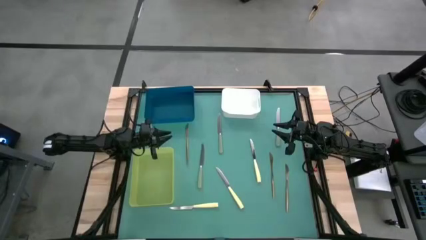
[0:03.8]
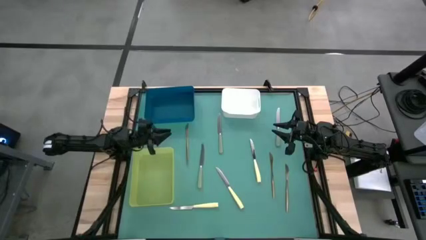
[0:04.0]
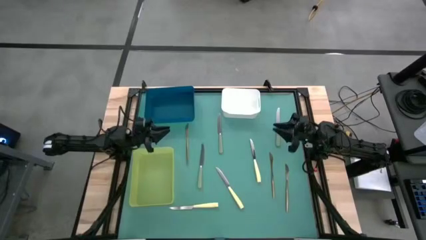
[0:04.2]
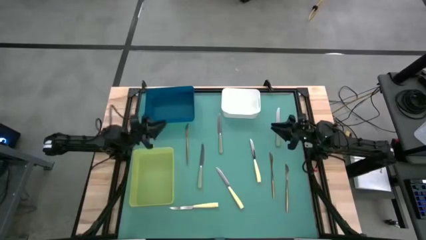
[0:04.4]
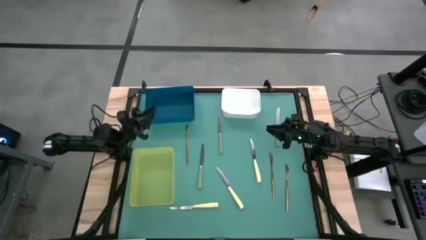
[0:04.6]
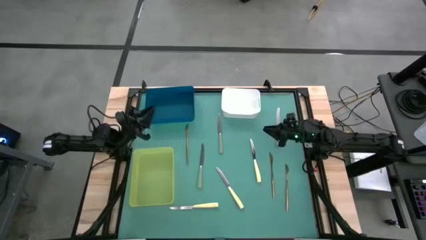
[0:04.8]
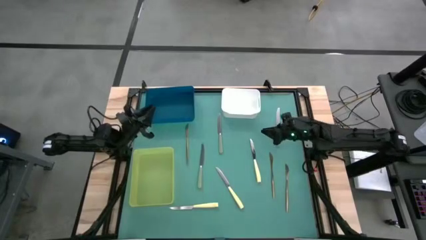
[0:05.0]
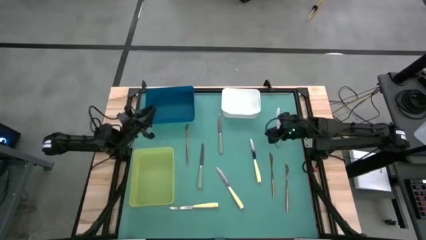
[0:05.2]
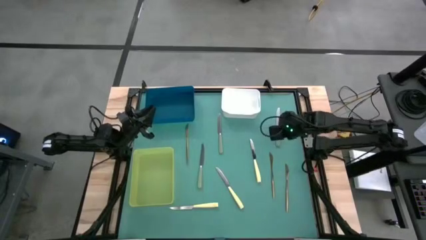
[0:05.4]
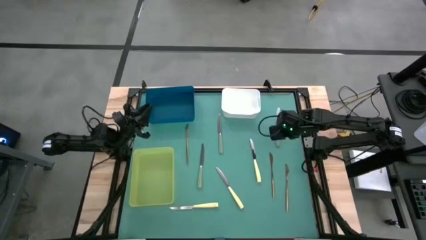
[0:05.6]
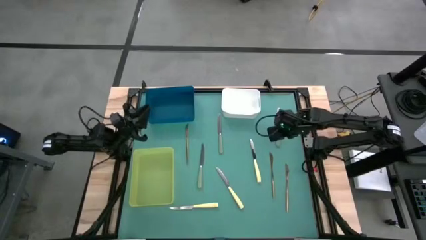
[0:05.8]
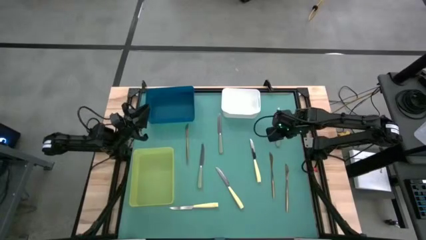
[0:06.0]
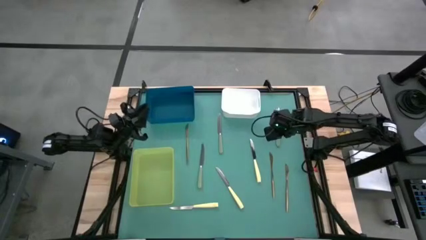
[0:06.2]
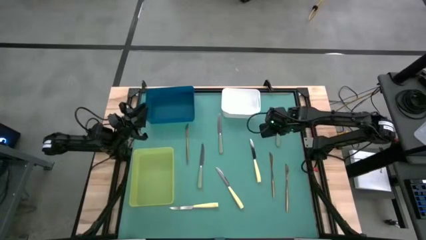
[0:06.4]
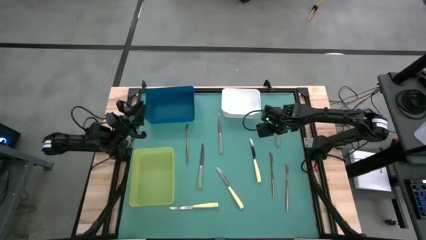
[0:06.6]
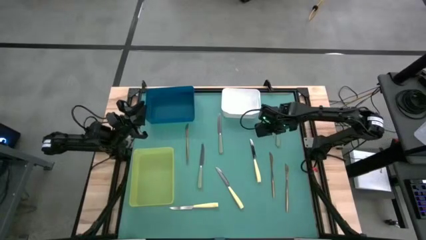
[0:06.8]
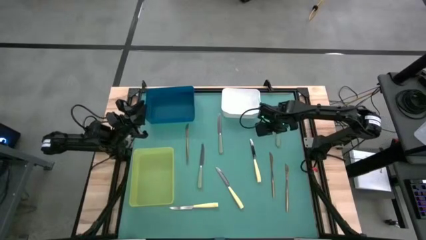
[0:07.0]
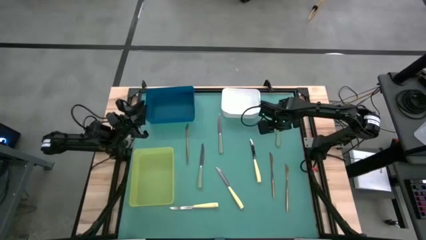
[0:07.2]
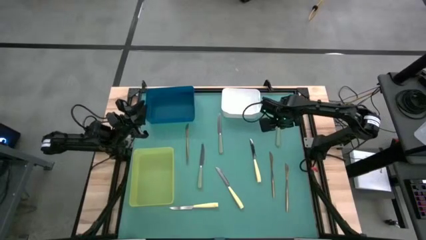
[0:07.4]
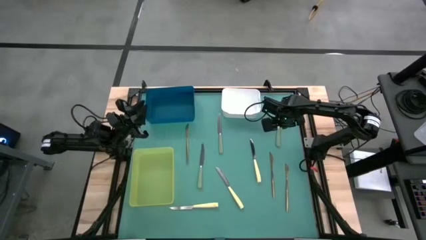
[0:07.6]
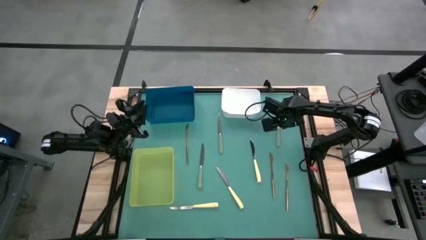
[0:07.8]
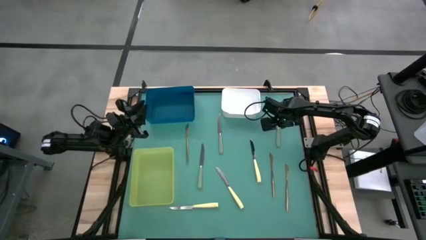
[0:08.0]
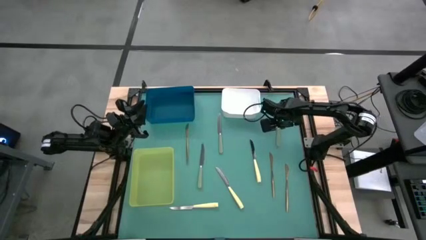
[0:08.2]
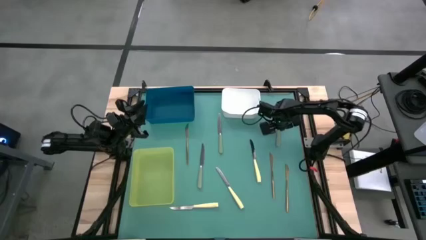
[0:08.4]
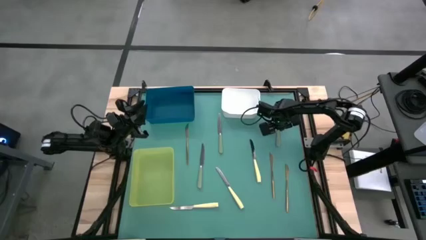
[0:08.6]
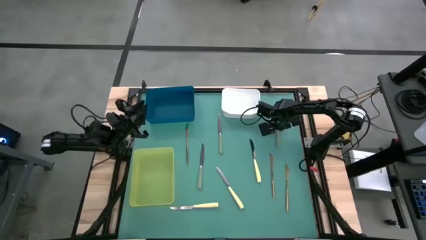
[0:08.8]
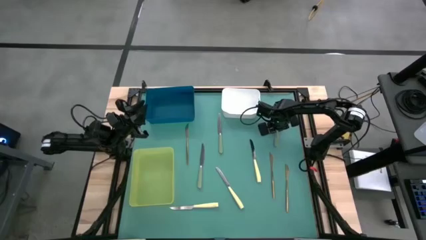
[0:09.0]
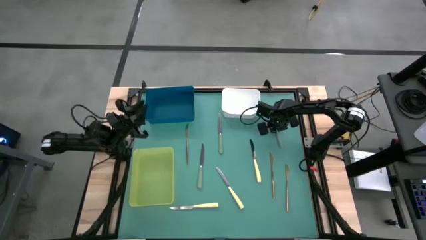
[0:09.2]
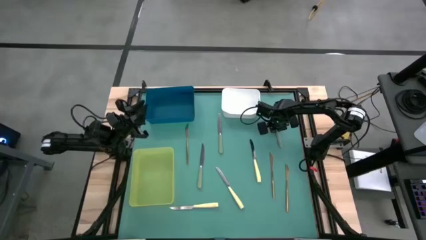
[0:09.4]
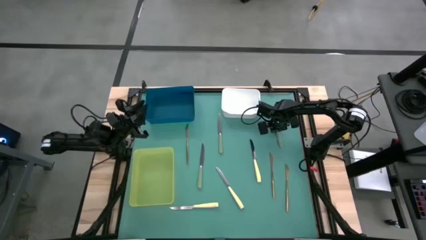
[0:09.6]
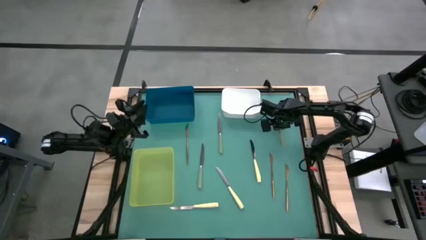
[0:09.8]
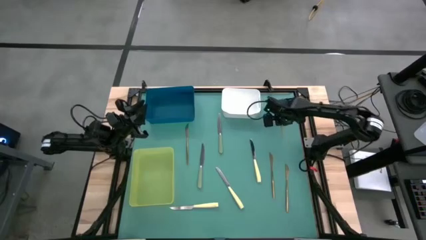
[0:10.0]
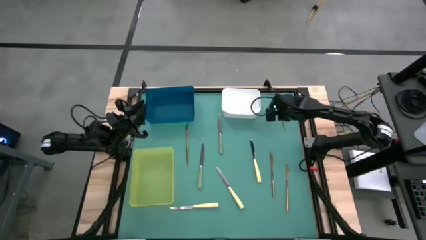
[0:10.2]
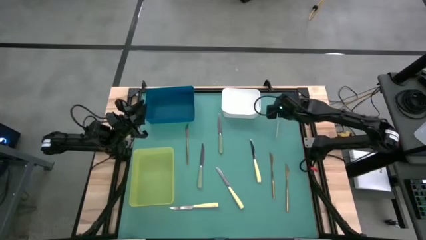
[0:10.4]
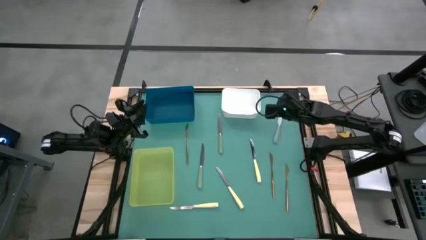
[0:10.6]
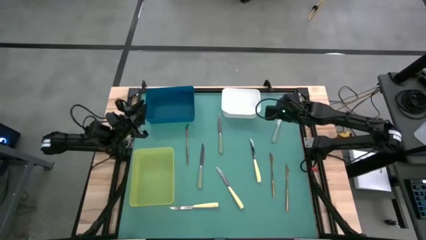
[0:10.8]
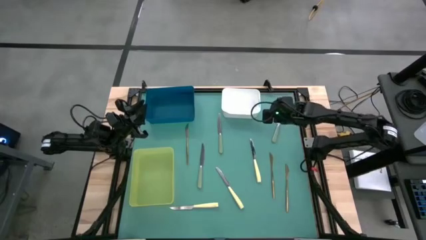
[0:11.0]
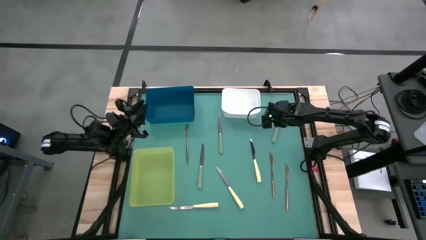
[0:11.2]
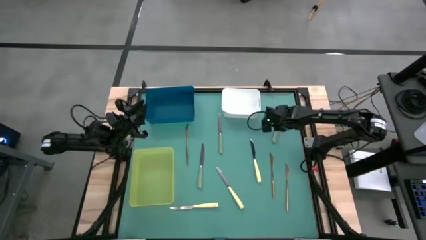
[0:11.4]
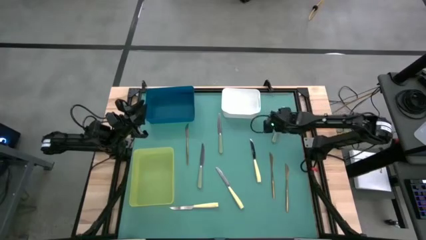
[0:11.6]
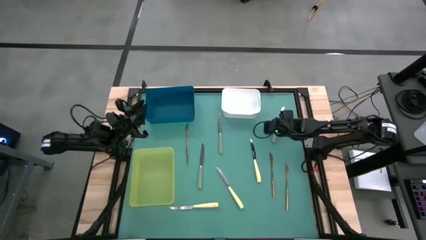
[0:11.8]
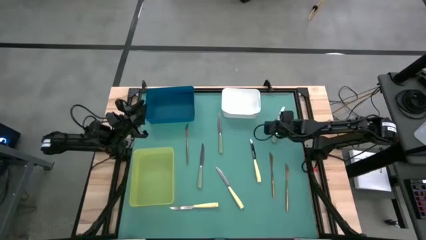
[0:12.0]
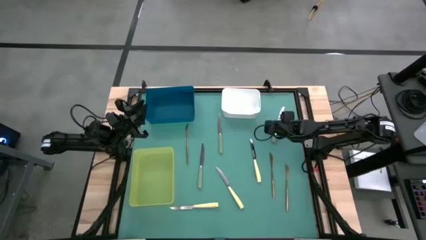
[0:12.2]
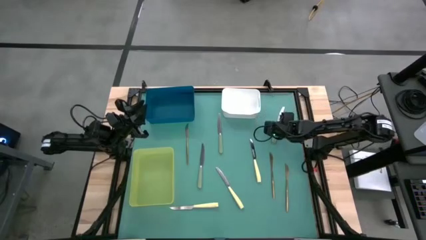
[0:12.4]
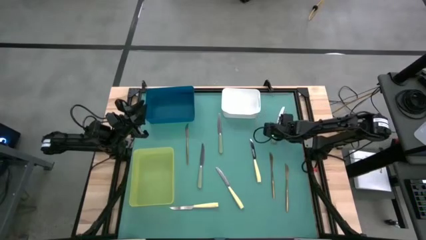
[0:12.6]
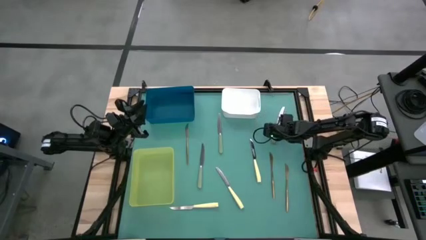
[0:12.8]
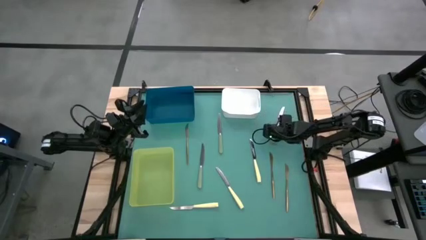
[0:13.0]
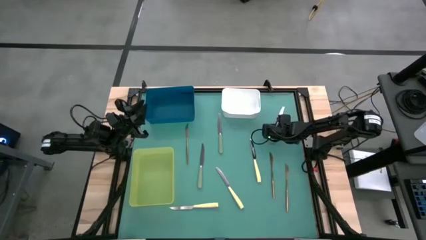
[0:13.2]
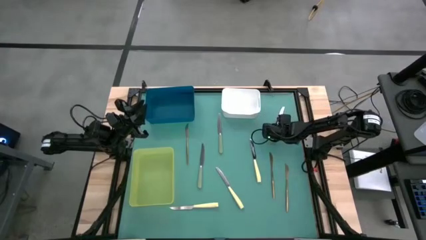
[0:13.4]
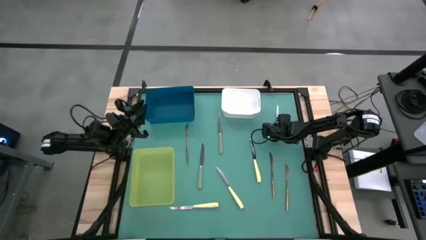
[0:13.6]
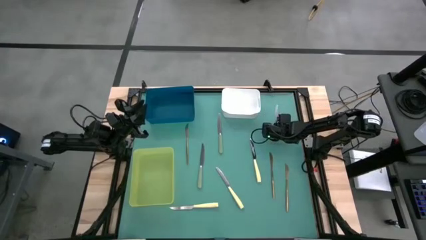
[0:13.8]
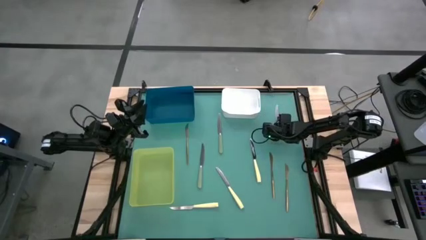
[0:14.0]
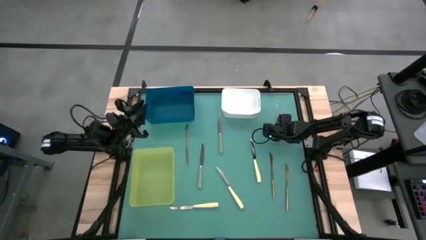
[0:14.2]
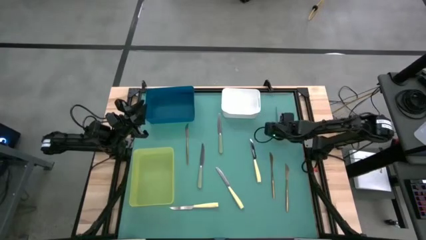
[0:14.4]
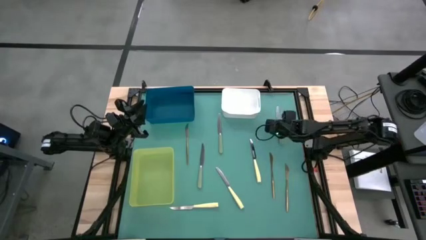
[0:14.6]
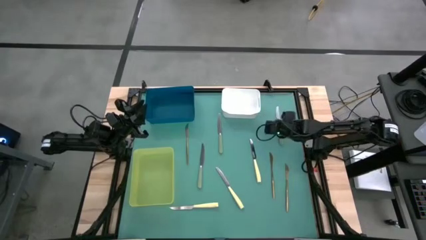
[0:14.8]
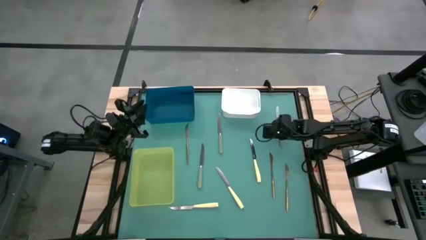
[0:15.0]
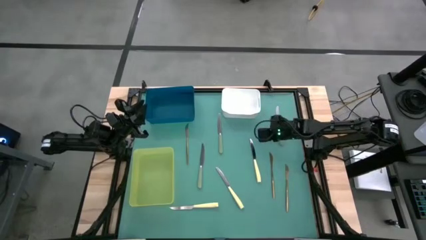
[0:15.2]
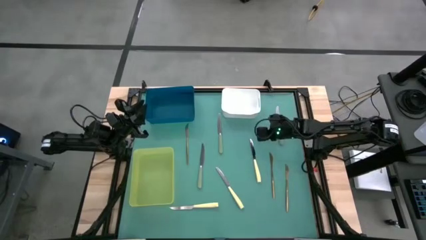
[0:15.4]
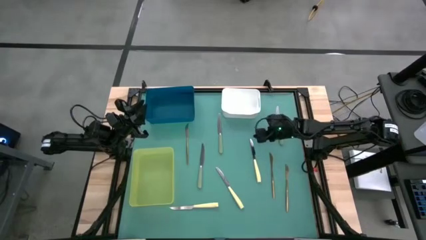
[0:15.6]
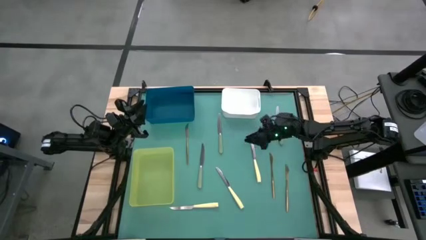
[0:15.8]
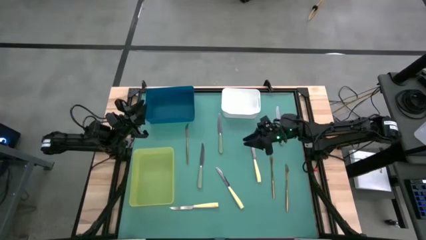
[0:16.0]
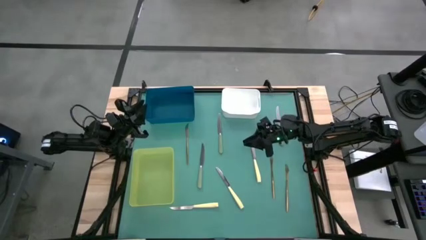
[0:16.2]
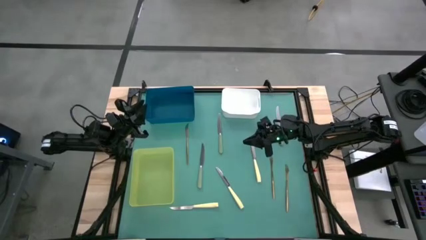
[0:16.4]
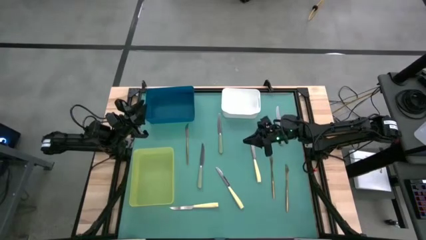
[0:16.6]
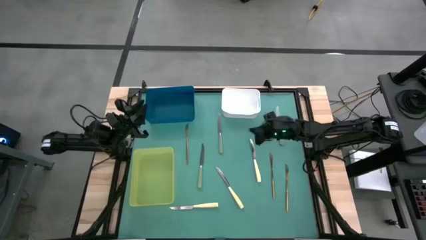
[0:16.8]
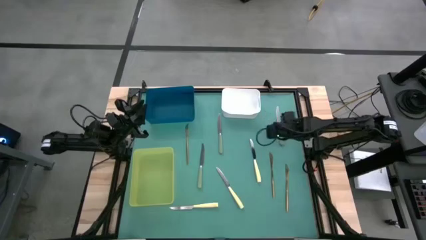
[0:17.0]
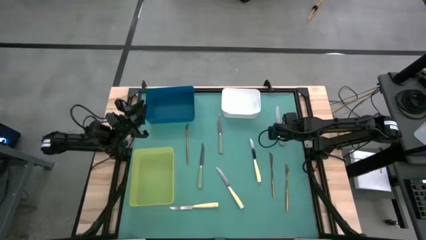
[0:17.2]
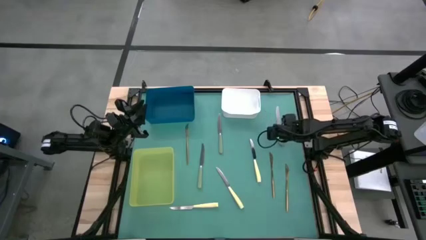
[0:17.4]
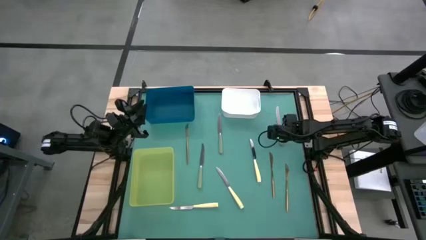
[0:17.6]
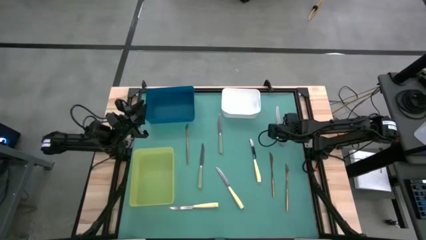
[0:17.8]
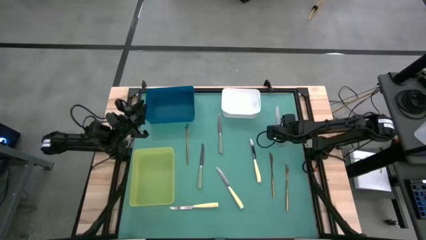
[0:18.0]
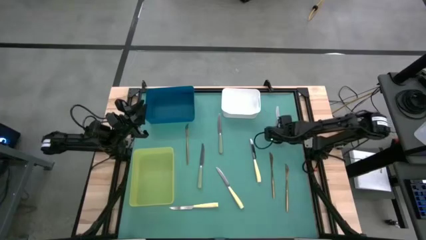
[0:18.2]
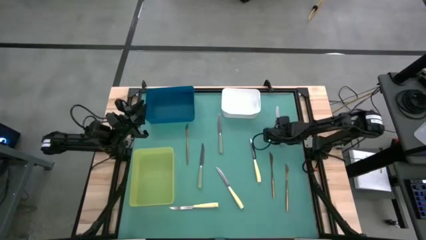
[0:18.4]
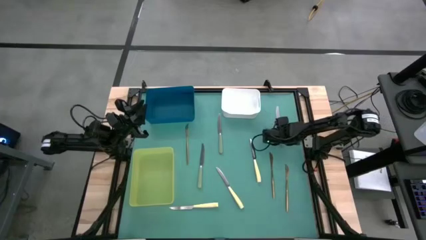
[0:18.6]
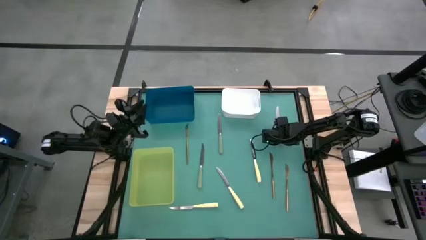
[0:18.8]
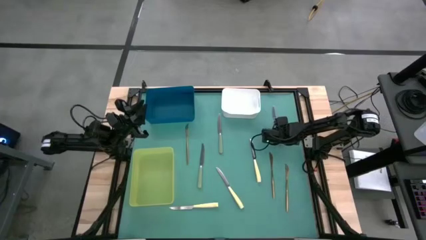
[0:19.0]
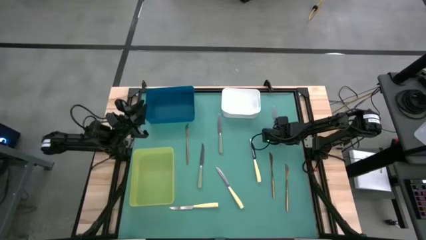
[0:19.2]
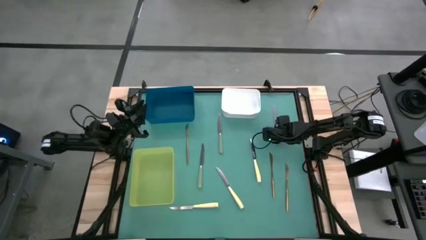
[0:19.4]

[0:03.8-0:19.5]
Task: Sort silverware by color (type)
Put the top right green knife into the green bin
